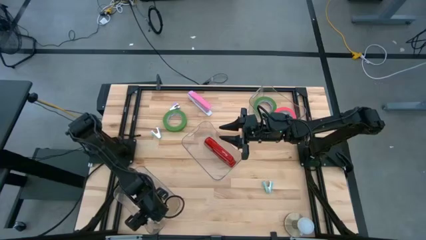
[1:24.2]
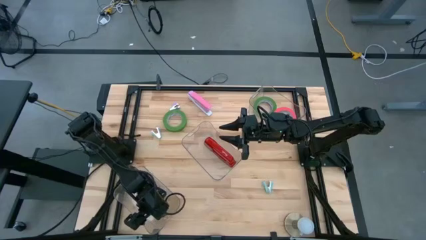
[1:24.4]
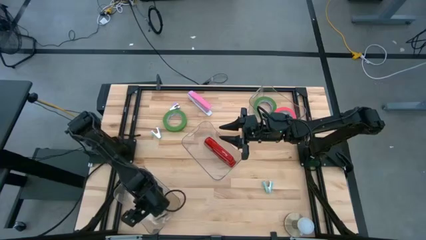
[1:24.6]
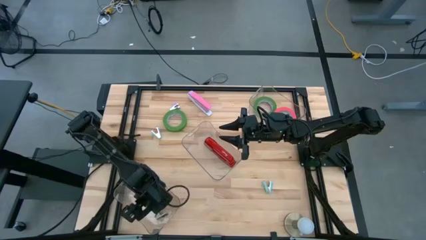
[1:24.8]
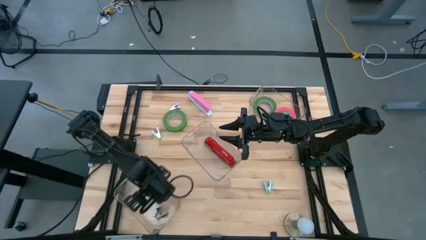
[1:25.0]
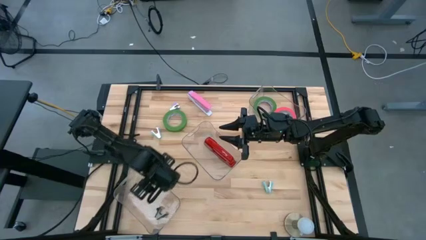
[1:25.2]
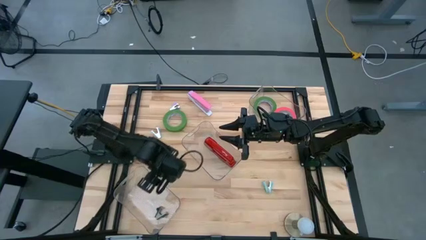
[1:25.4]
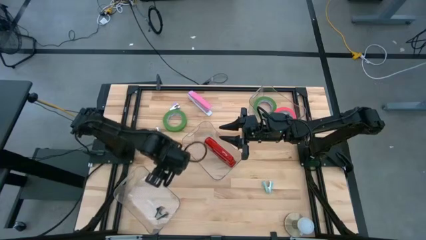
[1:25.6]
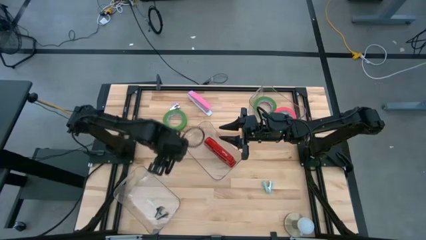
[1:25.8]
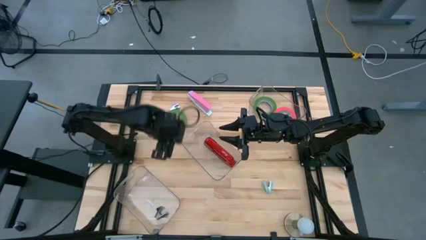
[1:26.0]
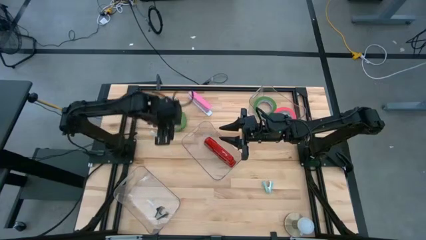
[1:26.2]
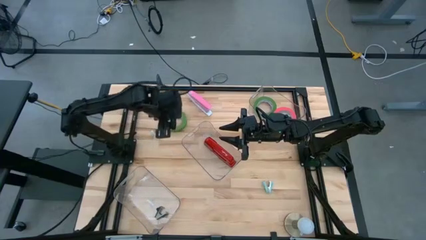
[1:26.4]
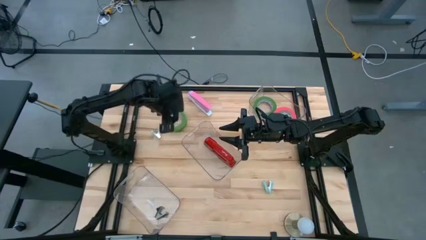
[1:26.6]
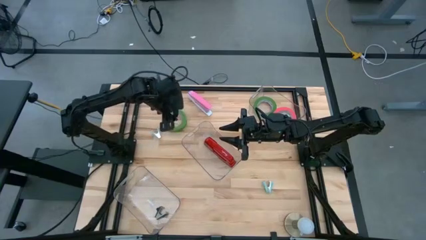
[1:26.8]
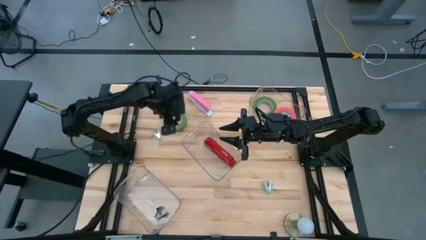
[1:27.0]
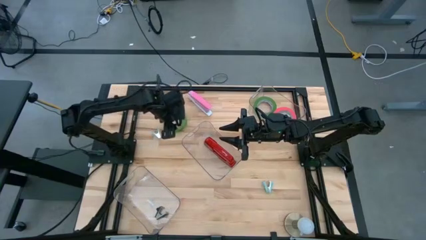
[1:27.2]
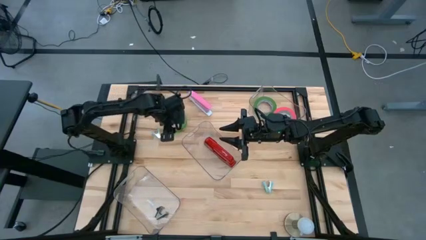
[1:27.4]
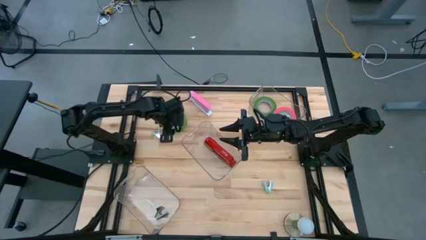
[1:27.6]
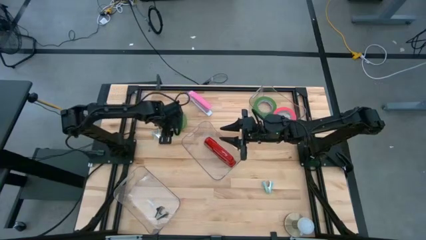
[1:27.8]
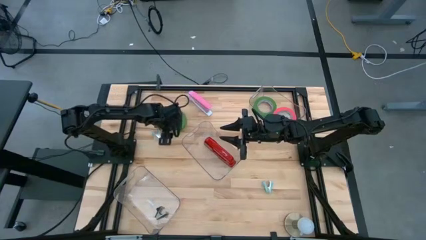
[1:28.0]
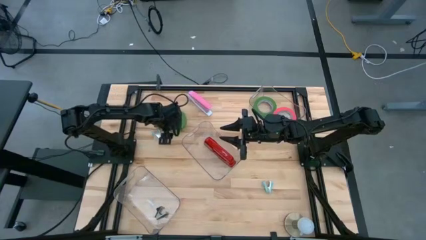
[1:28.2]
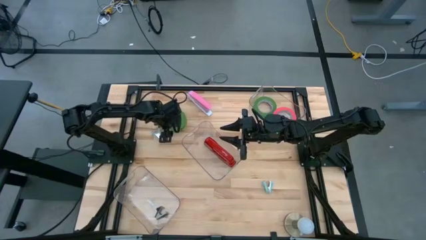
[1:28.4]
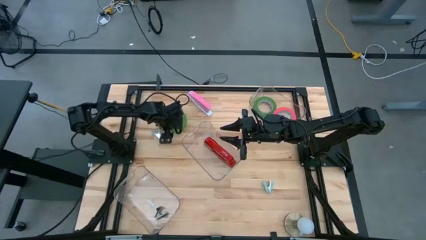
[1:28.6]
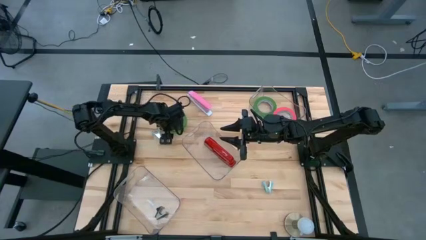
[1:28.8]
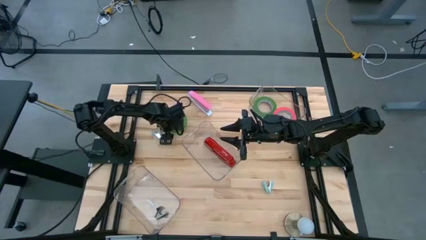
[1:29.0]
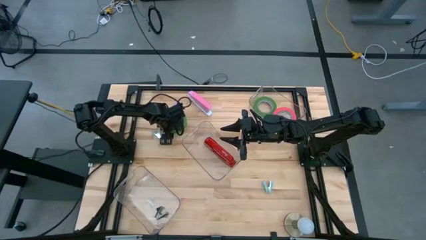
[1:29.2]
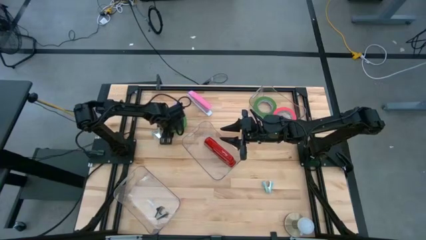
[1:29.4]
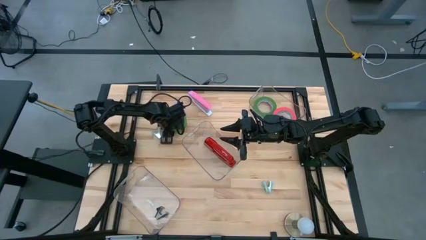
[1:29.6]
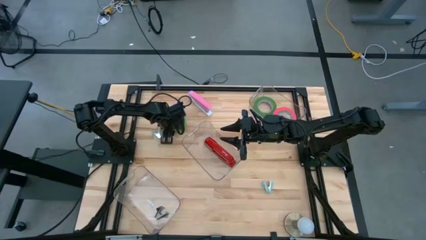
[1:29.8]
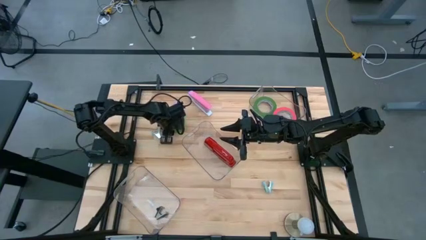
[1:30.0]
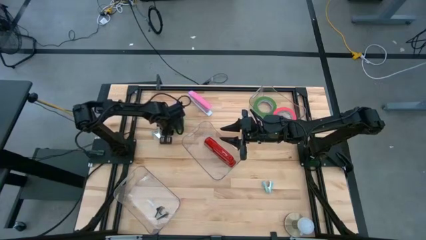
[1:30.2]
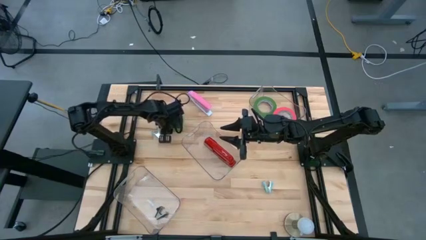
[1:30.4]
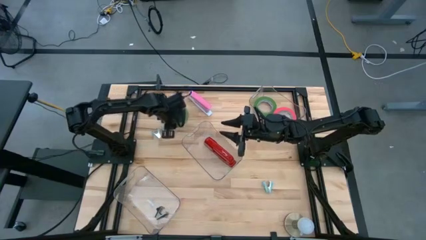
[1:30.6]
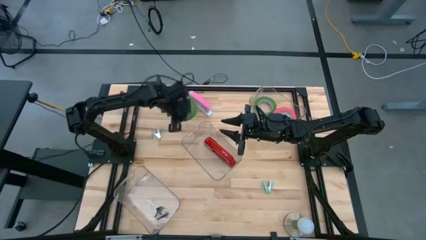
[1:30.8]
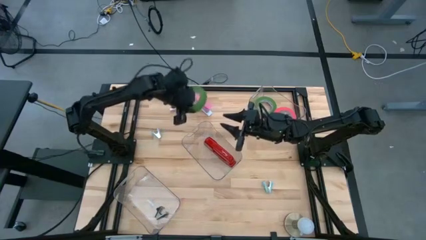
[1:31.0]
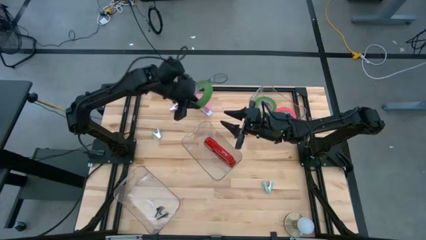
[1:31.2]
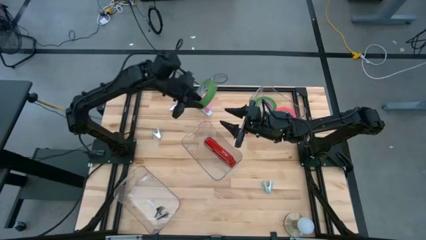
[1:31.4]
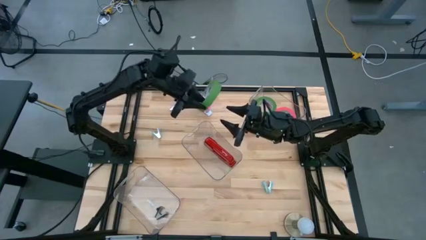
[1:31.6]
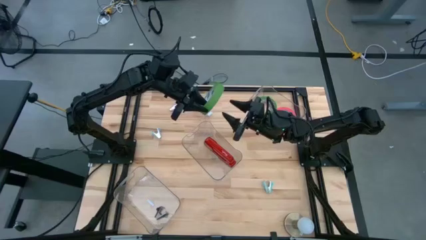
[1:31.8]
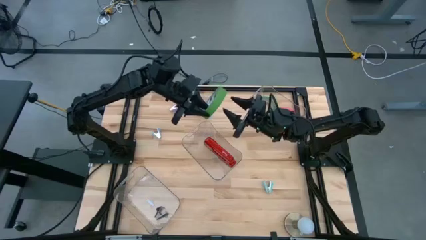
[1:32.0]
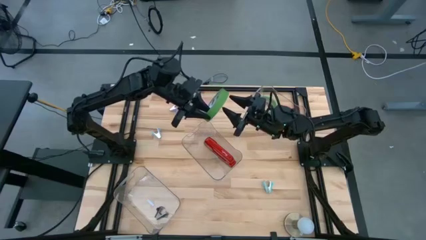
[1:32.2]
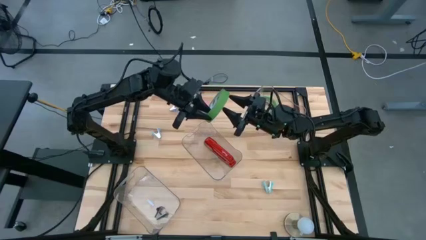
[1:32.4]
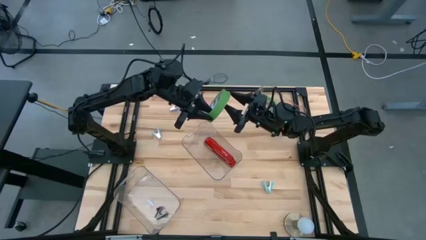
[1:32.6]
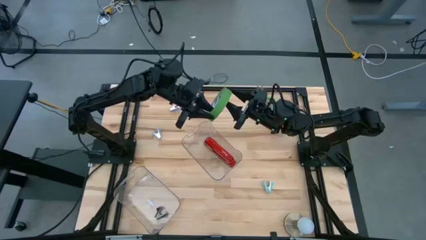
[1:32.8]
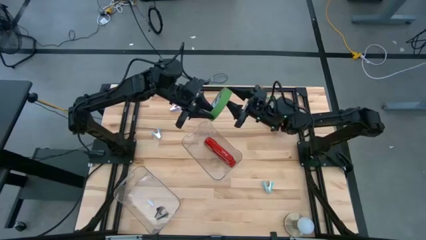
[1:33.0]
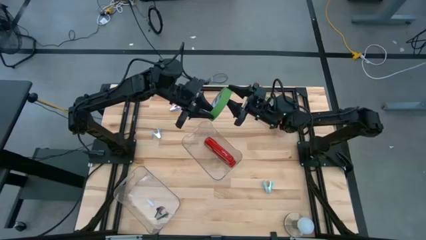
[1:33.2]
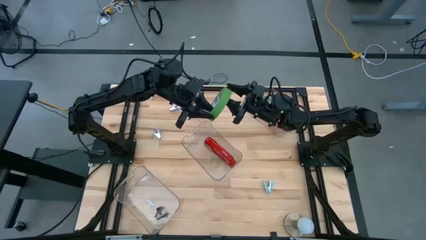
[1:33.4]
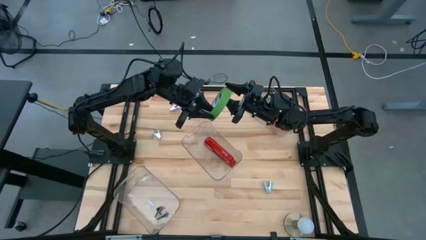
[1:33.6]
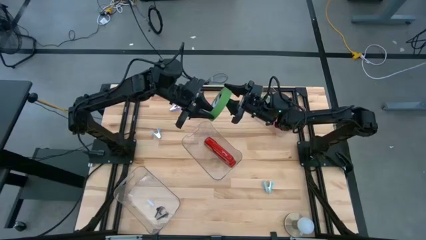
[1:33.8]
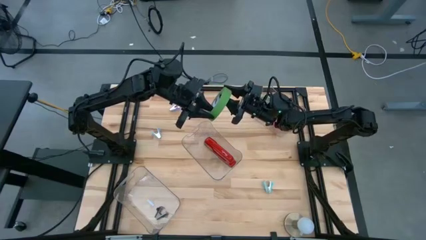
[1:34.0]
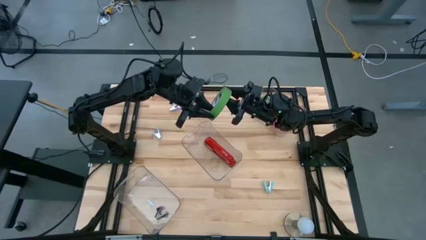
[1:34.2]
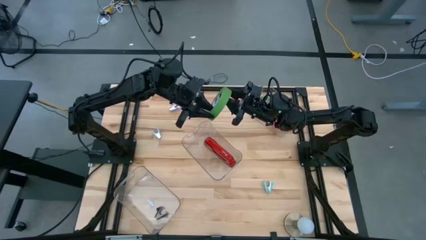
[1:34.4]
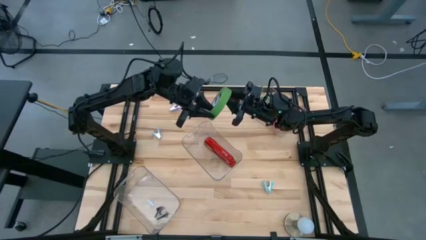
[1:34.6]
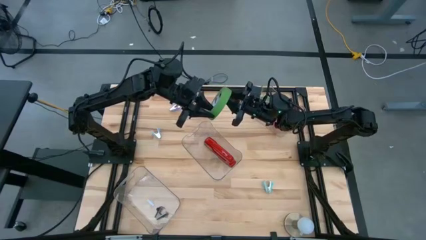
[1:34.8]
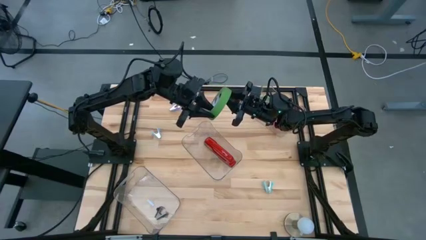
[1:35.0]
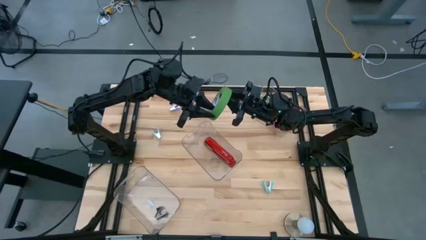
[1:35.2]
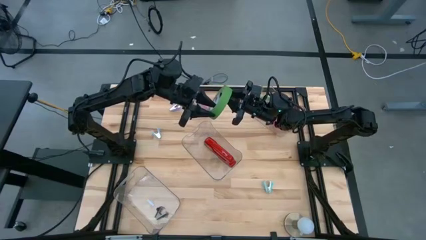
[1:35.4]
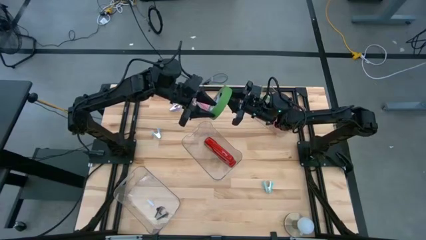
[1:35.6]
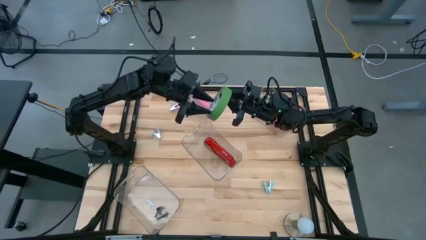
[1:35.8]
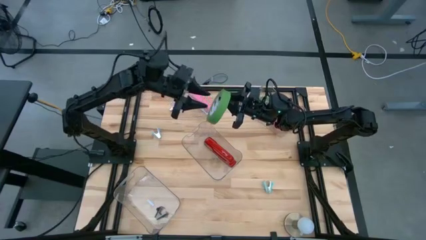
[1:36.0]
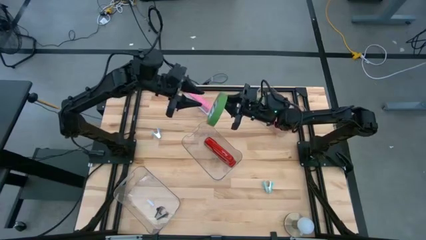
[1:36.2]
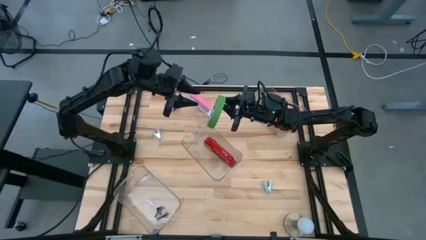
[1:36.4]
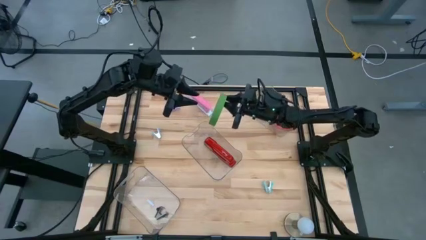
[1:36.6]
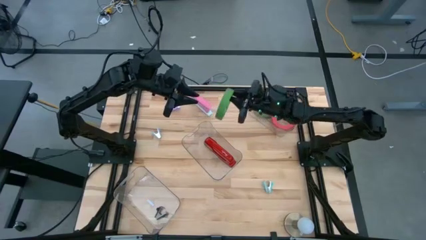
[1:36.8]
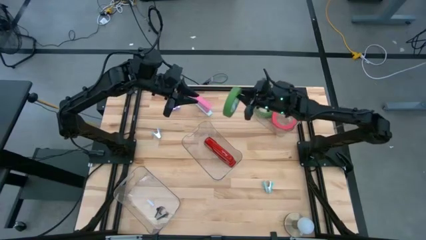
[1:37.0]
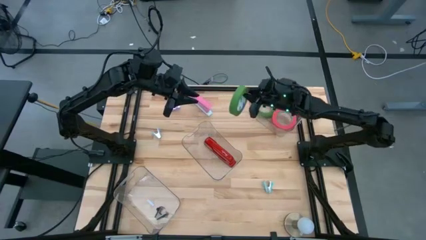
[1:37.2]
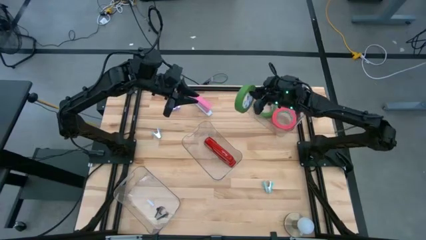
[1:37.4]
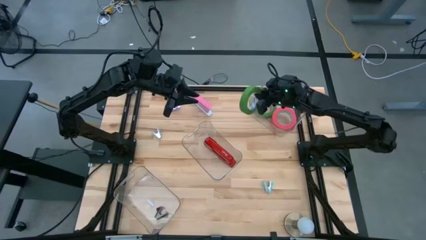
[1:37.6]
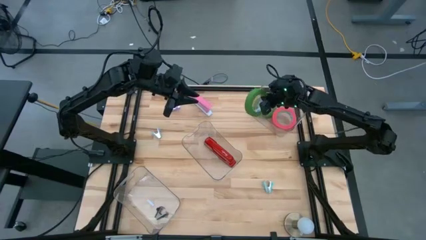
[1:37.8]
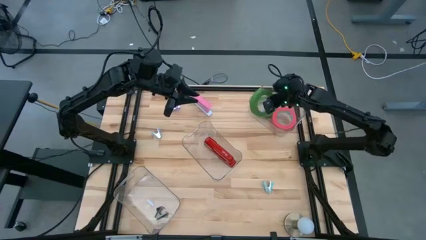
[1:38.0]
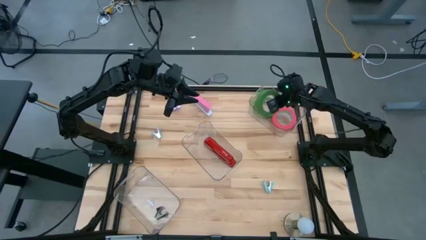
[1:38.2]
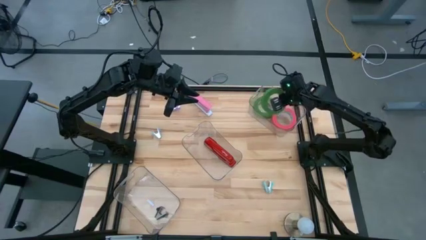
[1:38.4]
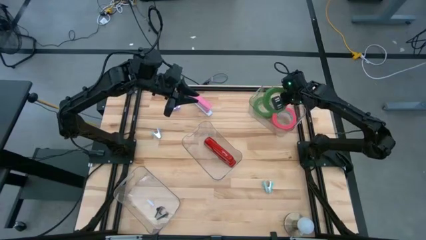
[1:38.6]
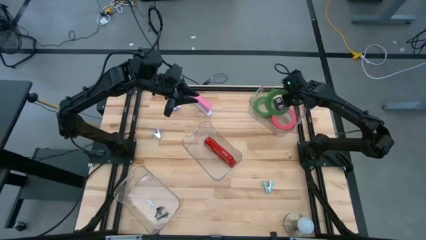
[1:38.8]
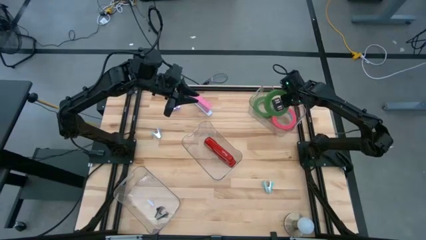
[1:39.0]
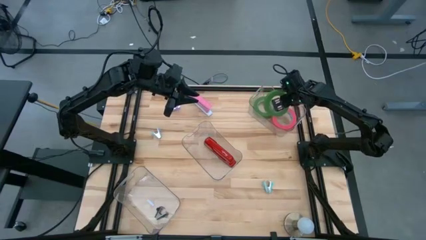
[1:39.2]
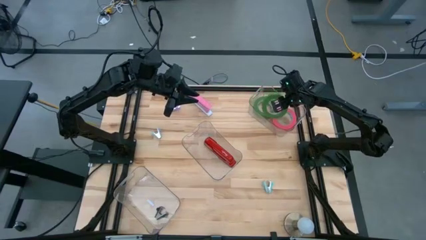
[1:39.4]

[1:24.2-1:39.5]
Task: Pick and place Stapler, Stapler remover, tape
Put the green tape into the top transparent bin

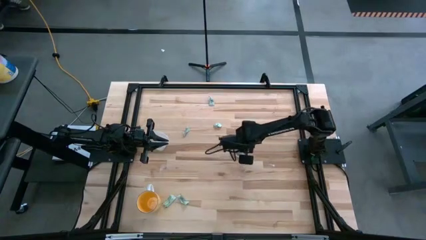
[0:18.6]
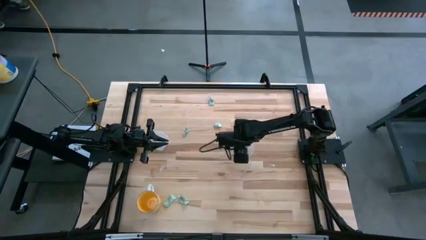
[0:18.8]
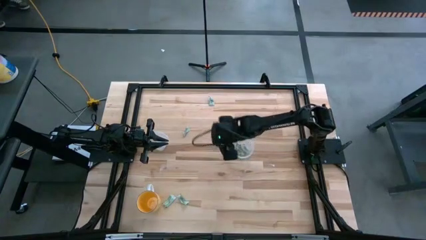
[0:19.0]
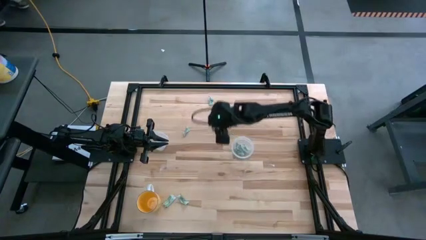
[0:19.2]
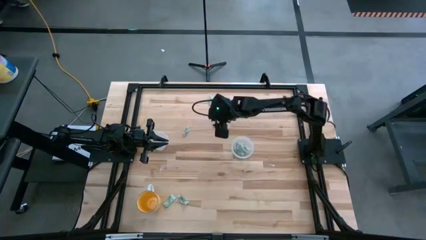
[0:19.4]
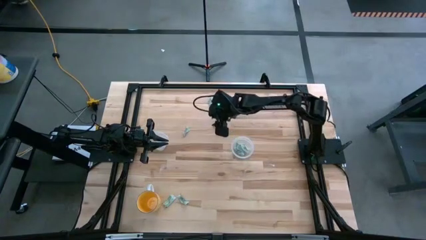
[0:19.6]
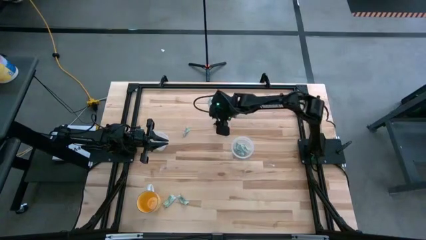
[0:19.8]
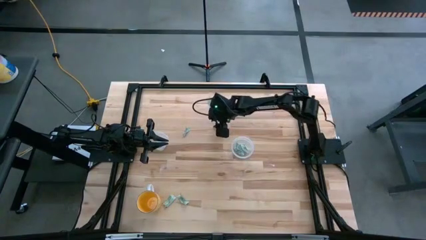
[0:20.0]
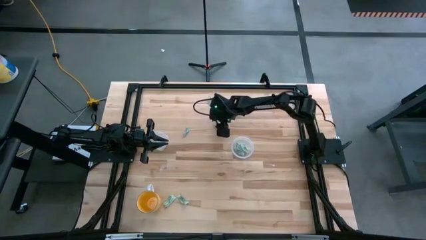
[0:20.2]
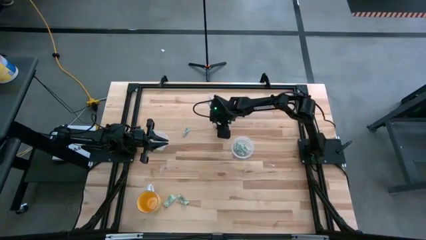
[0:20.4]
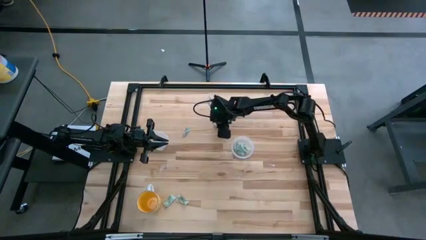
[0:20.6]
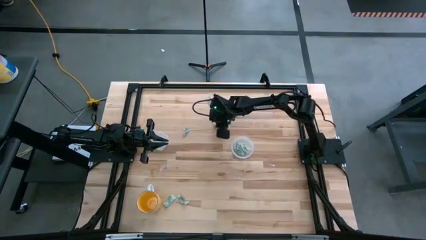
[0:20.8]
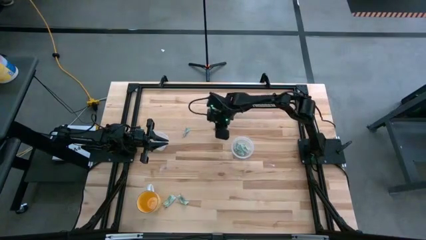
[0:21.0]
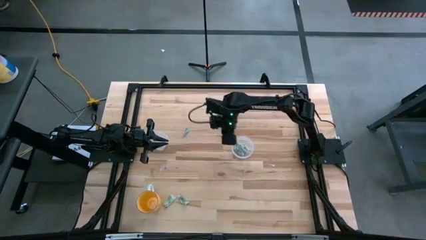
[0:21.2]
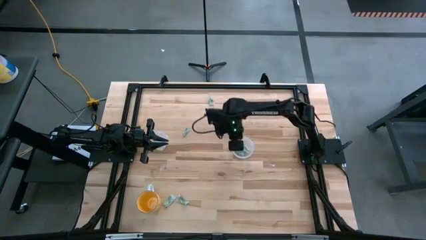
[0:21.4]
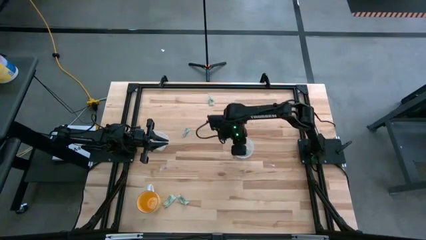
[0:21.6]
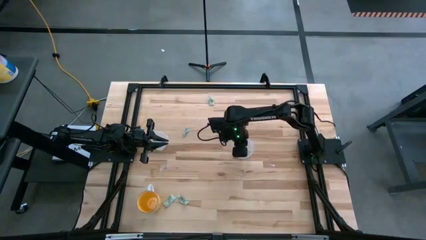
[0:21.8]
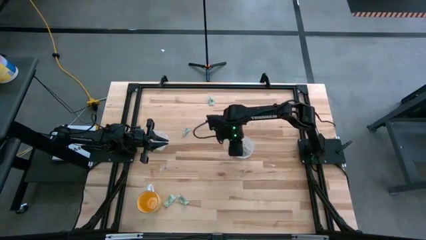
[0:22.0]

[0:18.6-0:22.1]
Task: Pick and place items into bin
Put the stevia pack into the right transparent bin
